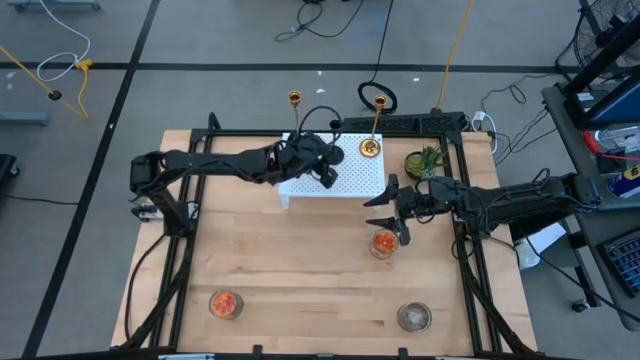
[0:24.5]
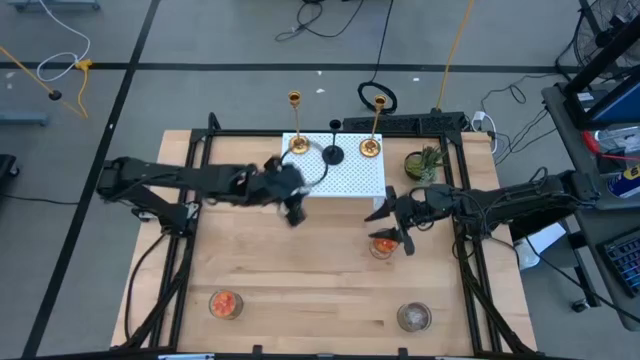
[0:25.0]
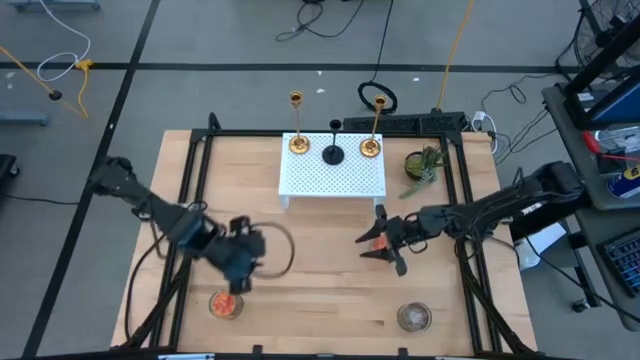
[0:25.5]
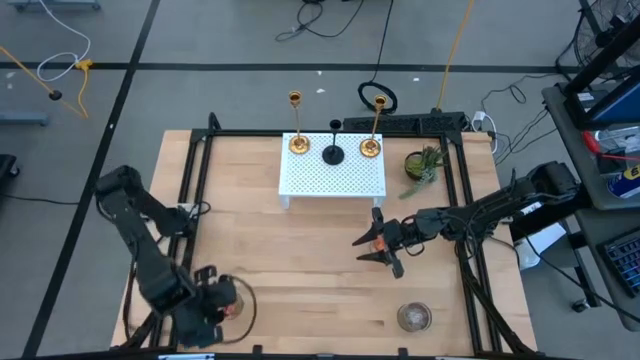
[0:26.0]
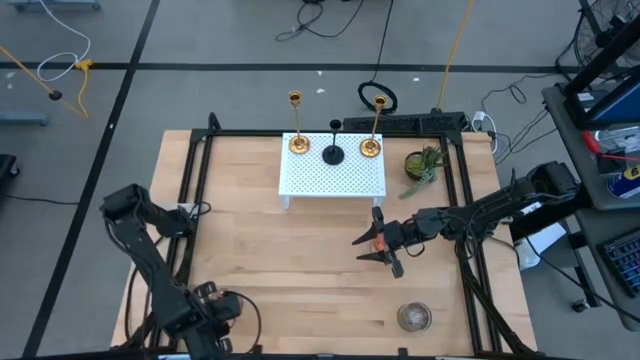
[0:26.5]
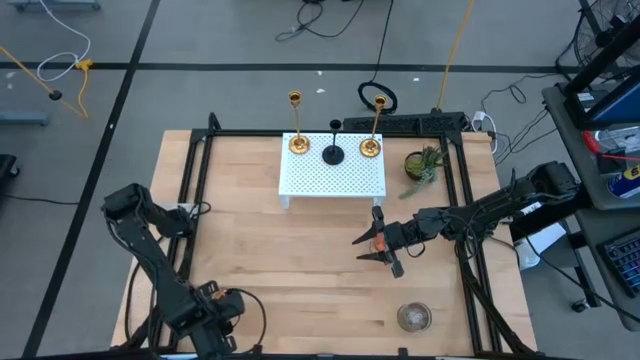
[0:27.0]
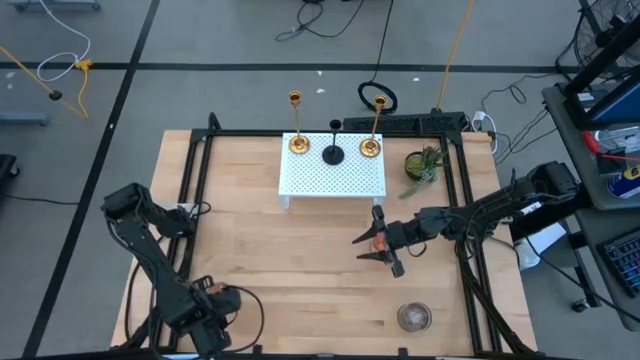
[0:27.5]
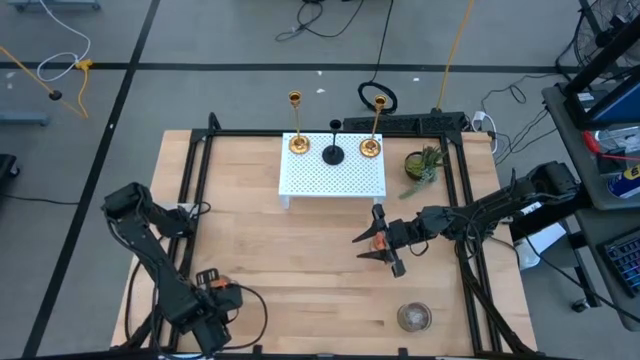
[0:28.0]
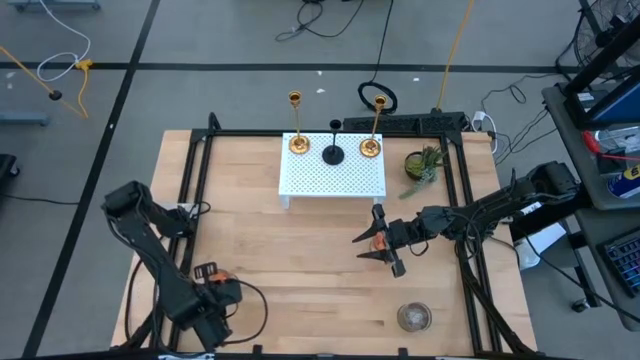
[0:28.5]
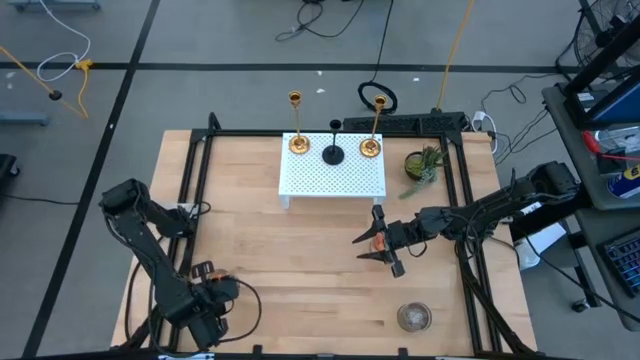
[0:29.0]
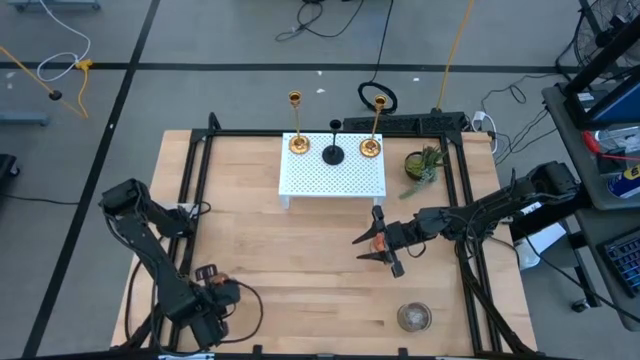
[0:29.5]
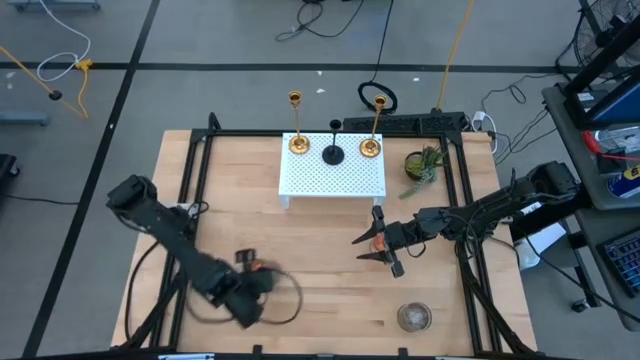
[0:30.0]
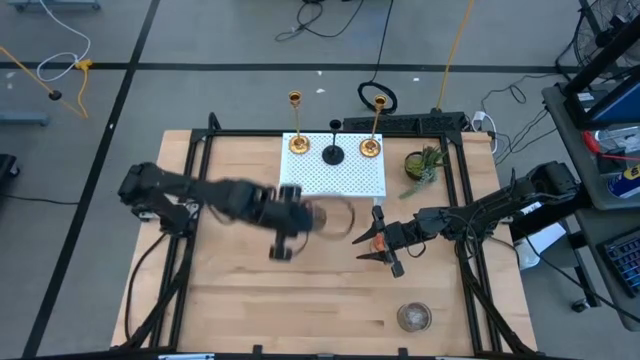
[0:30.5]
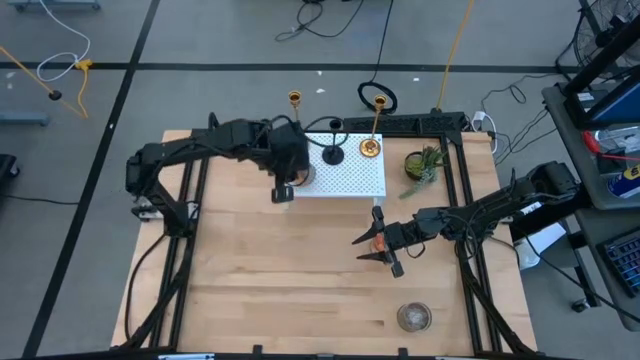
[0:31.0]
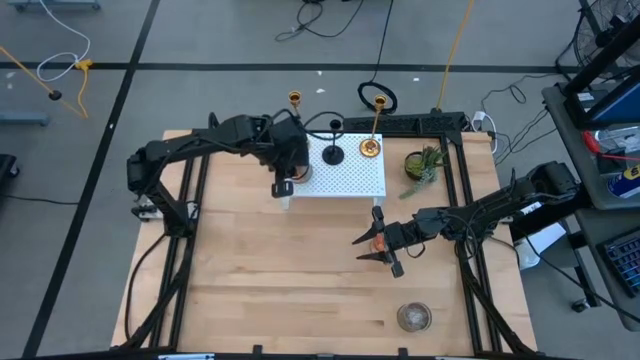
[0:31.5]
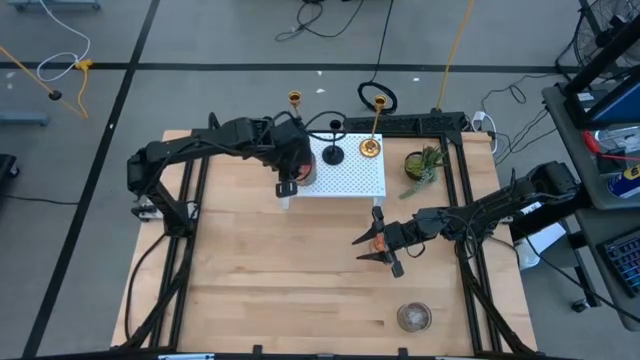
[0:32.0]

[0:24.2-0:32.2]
Task: Pick & Place candle stick holders
Put the left orange scented candle on the shelf aligned with the other golden candle holder

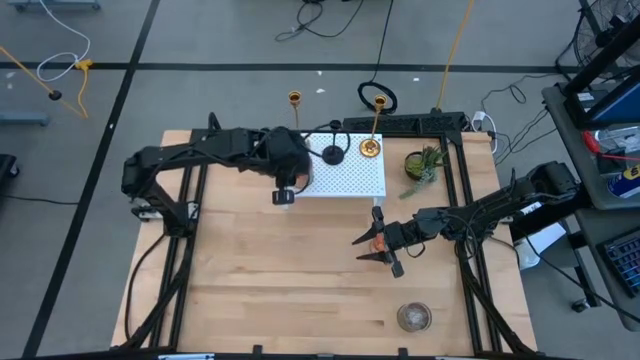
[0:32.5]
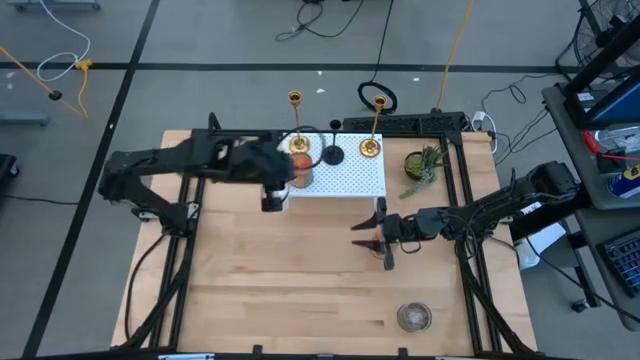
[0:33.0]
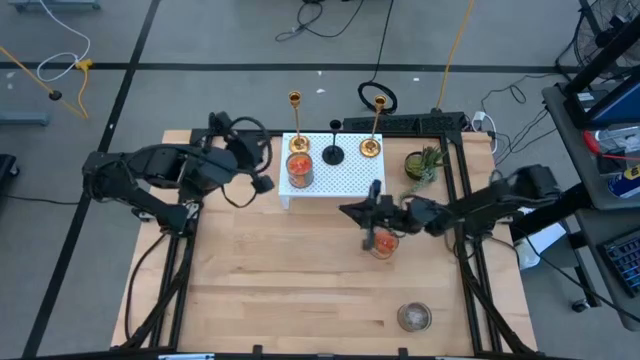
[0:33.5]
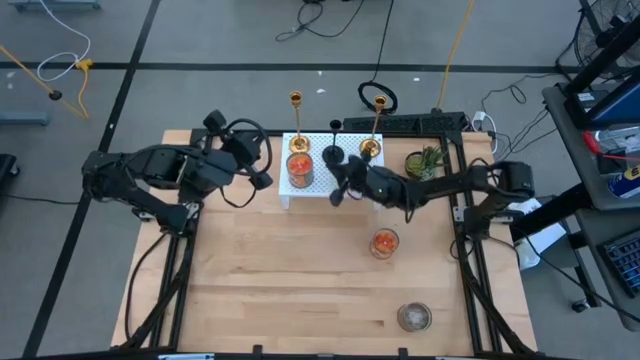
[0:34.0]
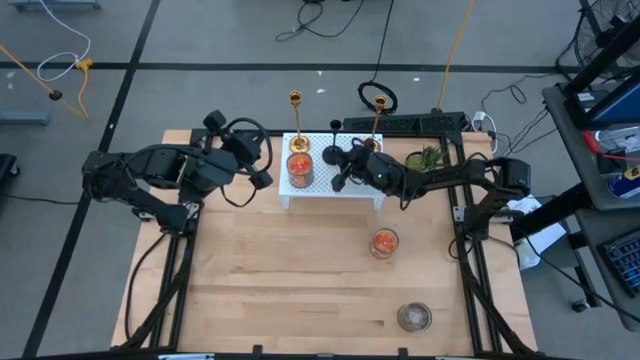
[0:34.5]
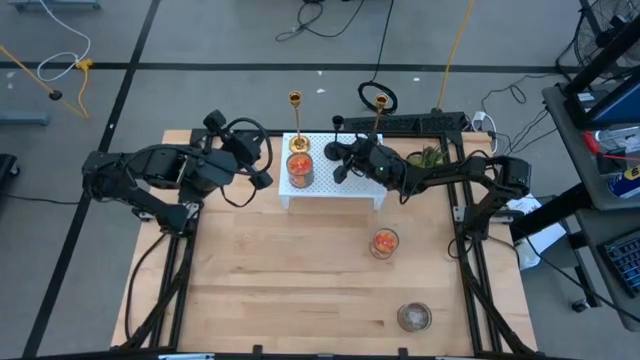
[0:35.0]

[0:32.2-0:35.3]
Adjust the black candle holder on the shelf

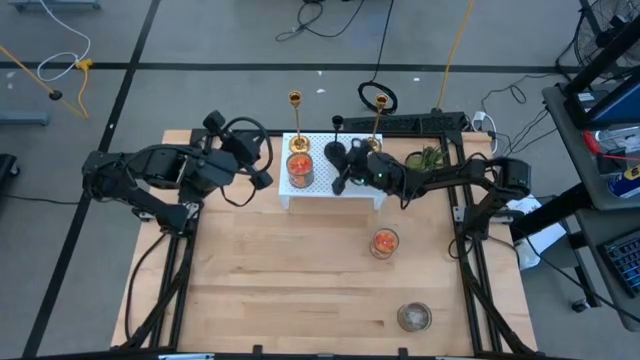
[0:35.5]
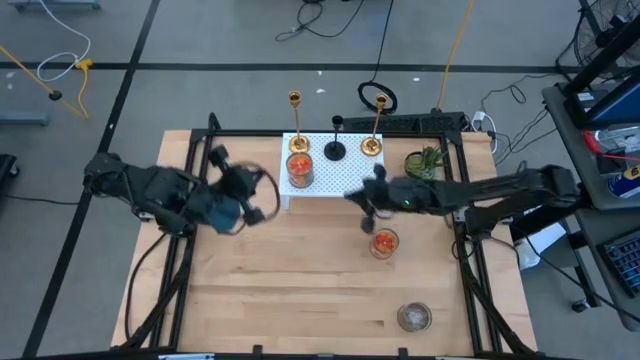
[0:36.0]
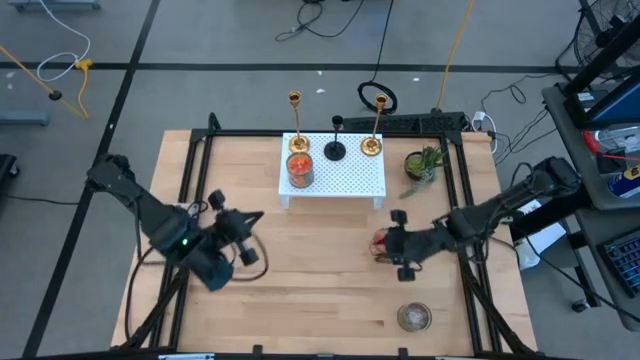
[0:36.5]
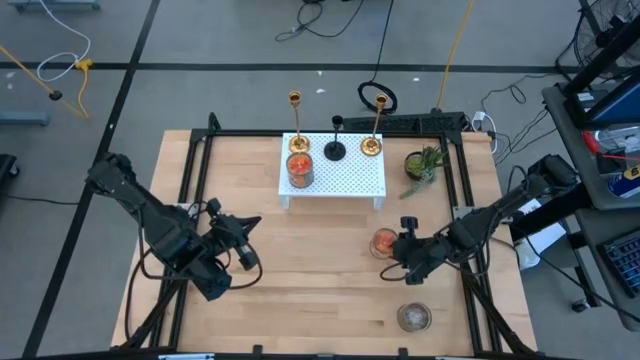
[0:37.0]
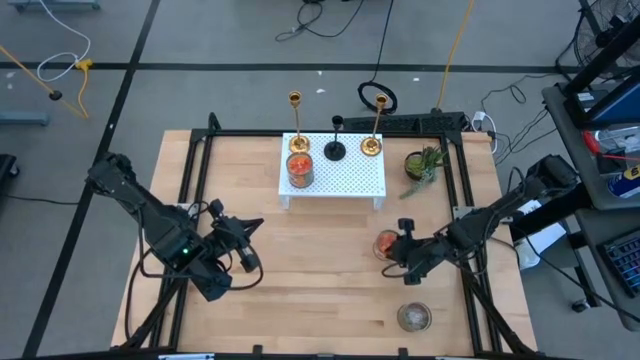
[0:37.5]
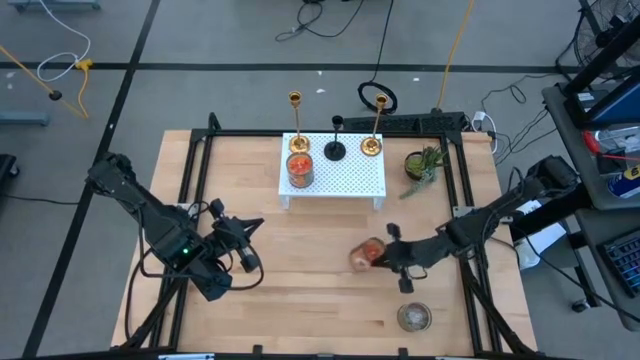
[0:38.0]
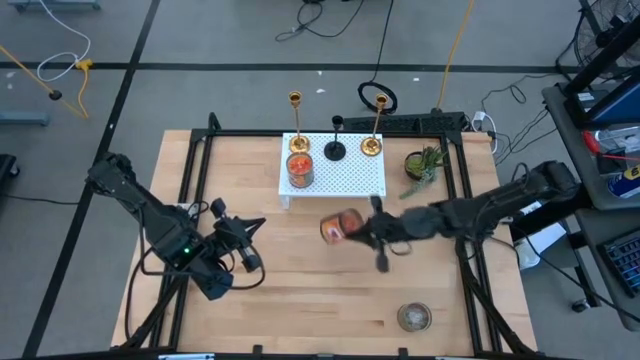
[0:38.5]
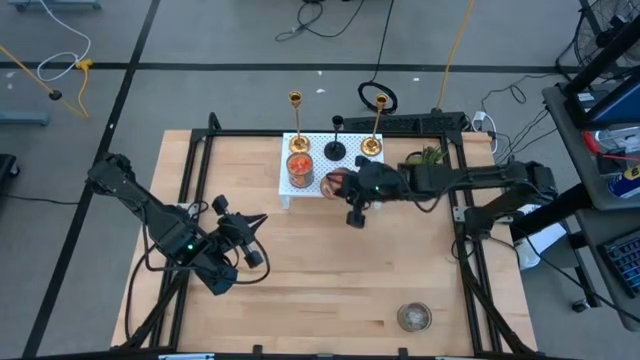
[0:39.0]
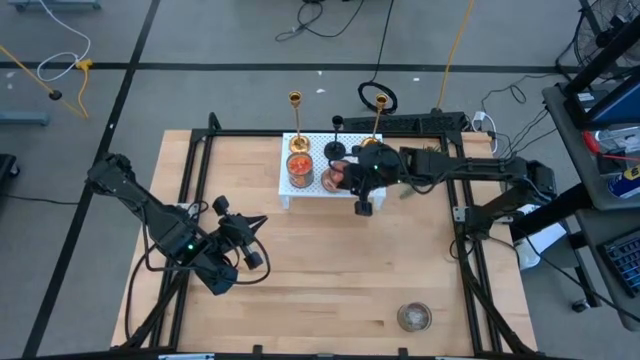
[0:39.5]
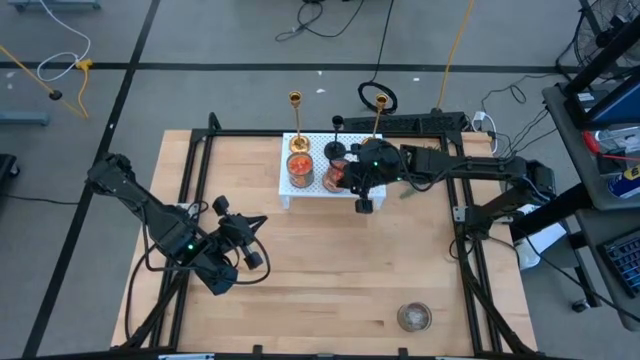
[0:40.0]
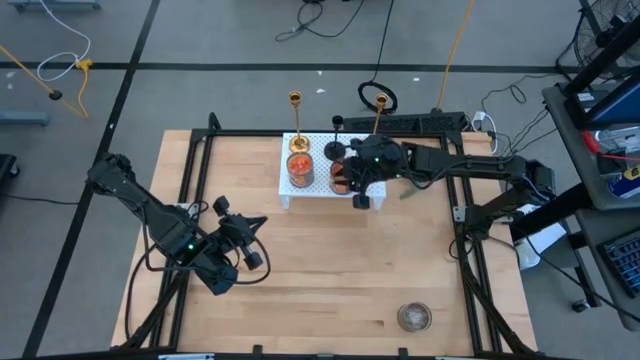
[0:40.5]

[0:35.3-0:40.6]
Put the orange scented candle on the shelf aligned with the other black candle holder

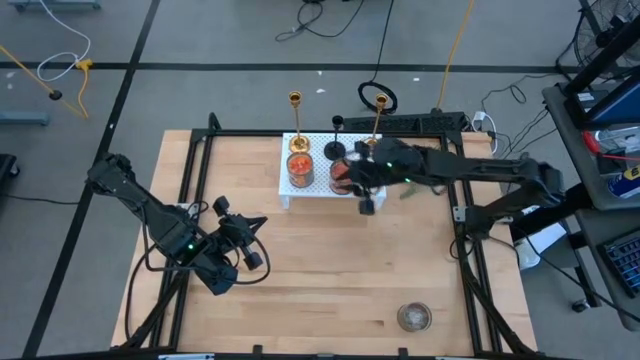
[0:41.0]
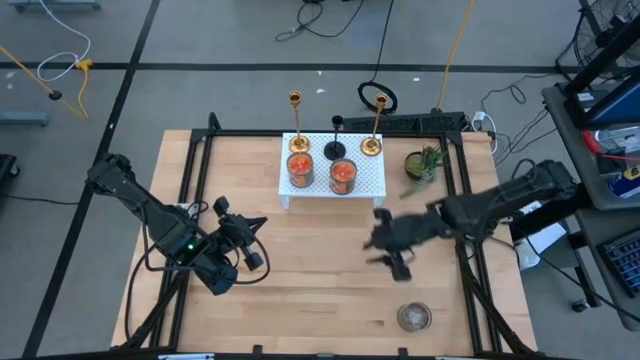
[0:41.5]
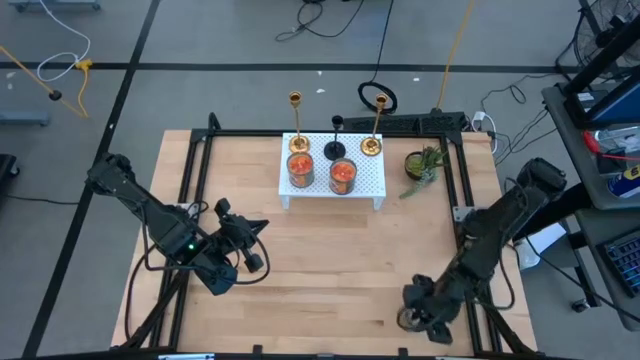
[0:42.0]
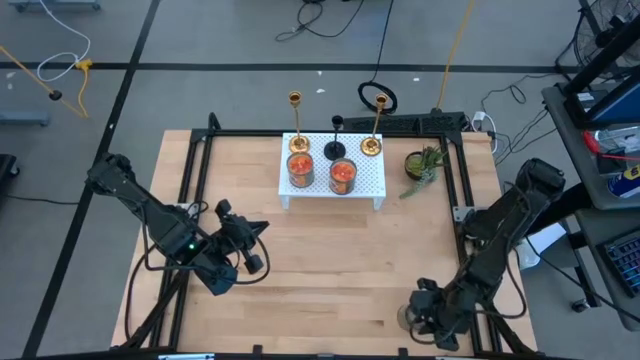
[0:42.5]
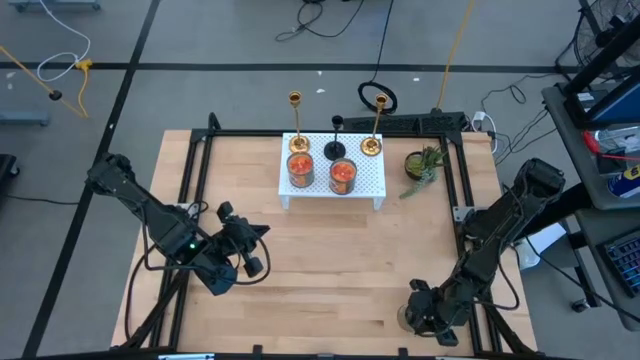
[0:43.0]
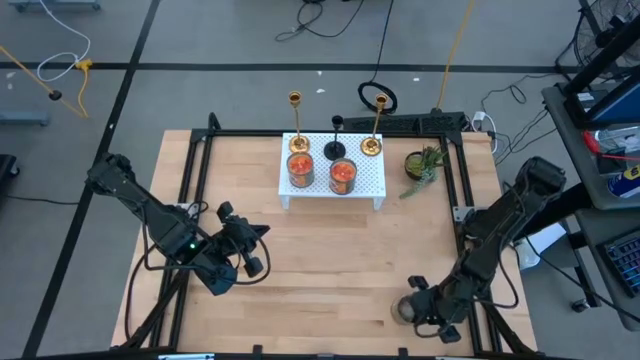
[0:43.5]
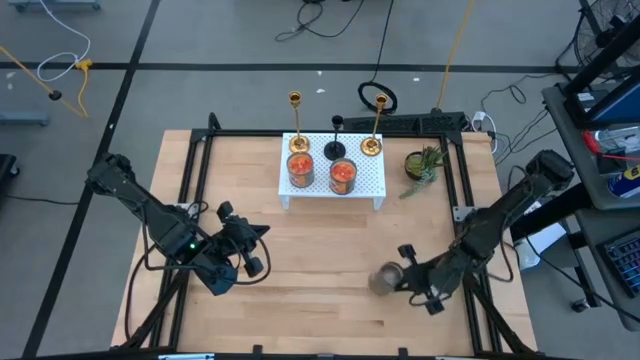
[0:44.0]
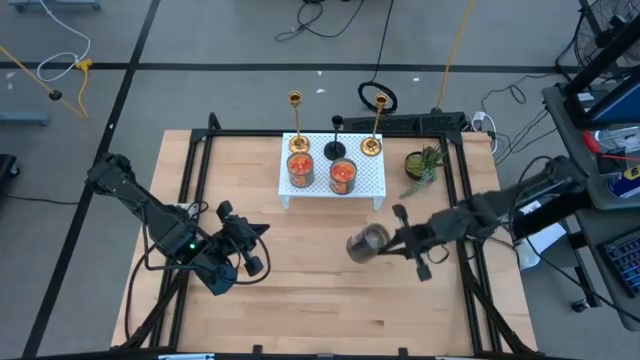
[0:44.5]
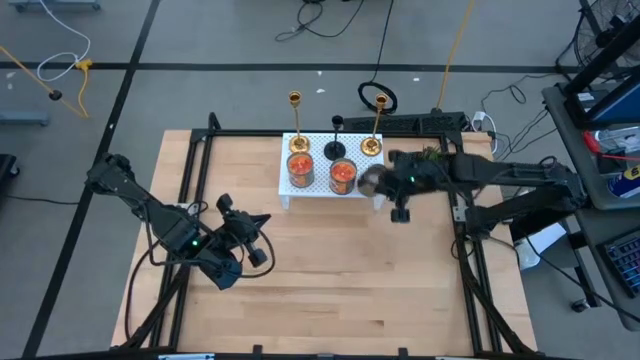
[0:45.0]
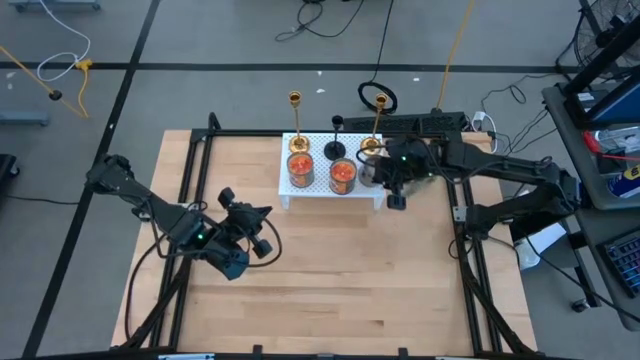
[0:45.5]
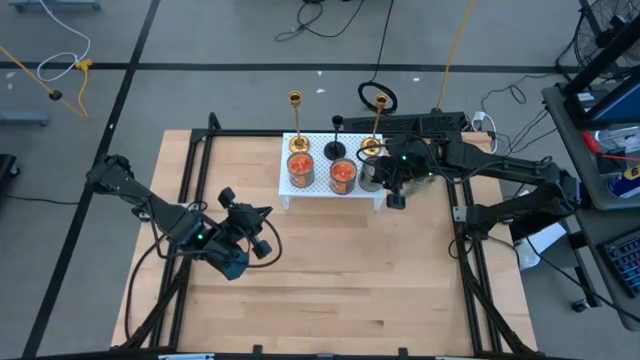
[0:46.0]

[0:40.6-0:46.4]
Put the brown scented candle on the shelf aligned with the other golden candle holder
